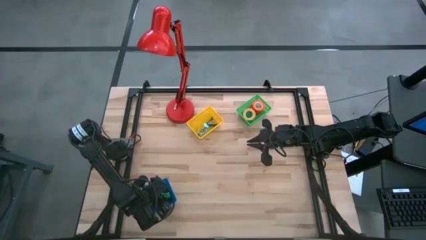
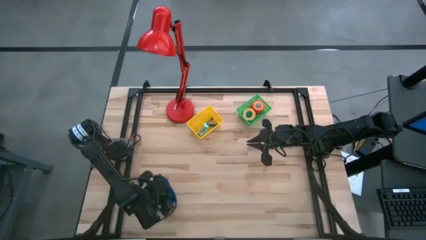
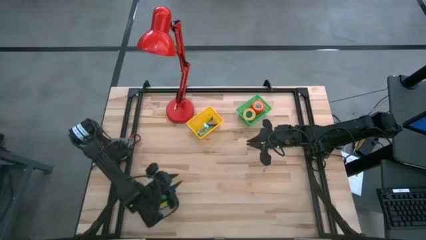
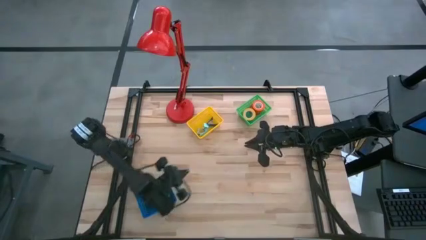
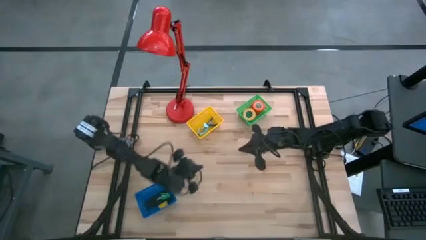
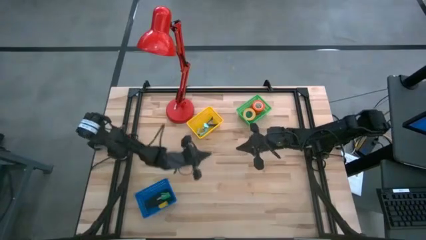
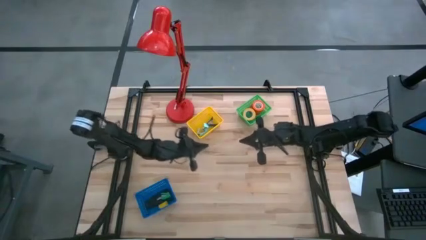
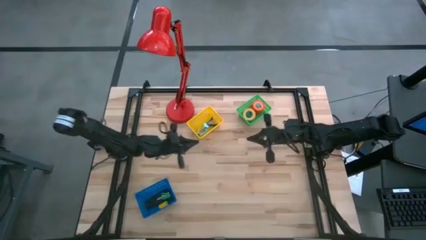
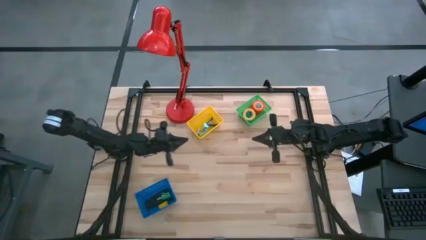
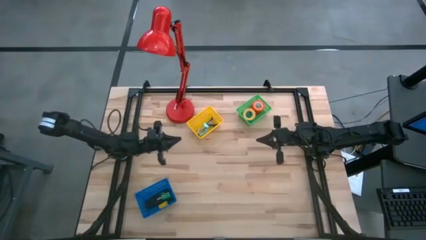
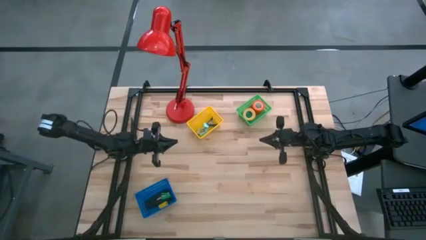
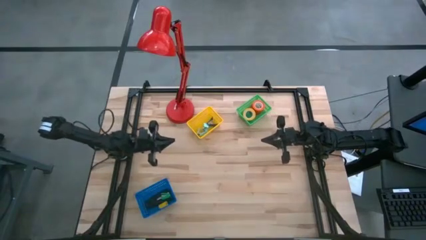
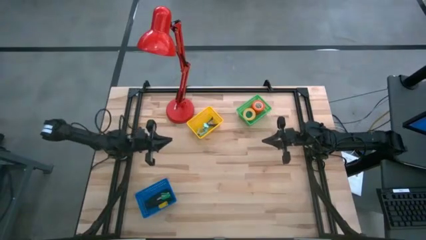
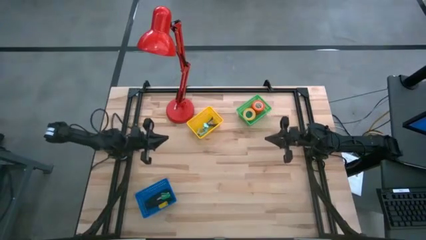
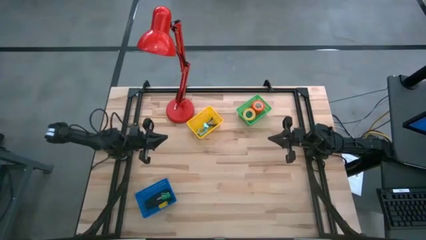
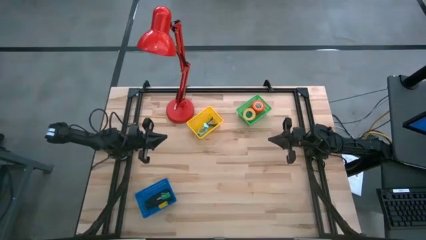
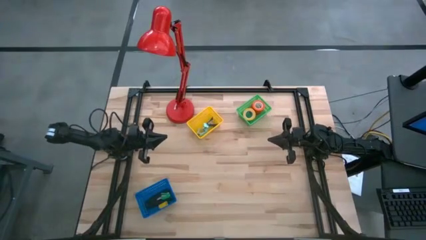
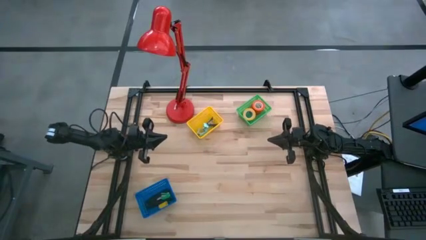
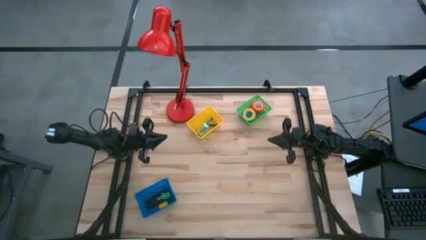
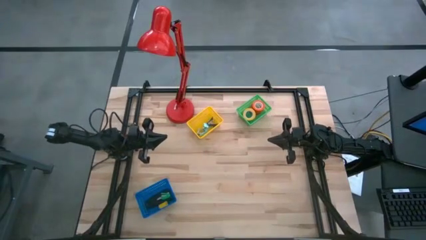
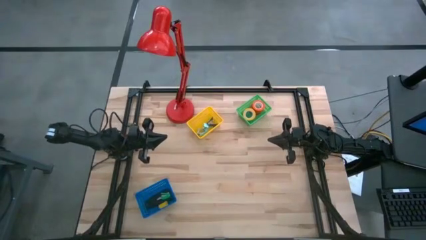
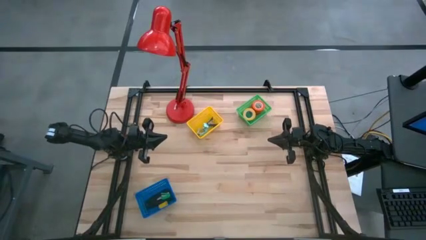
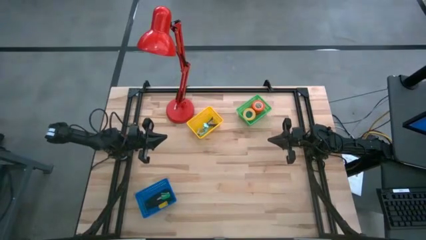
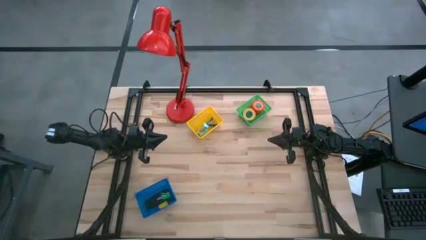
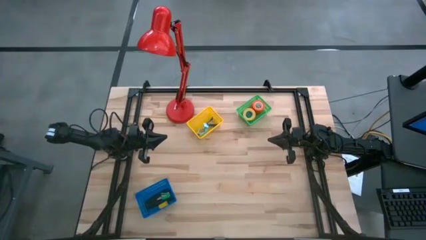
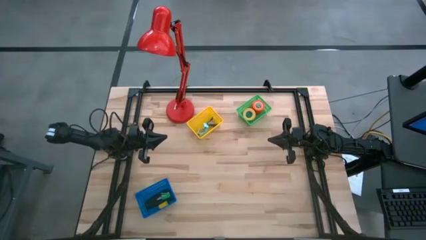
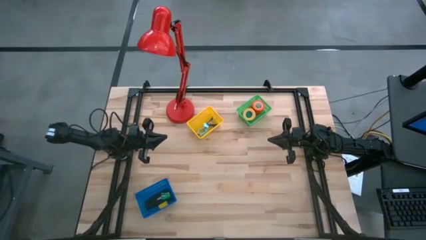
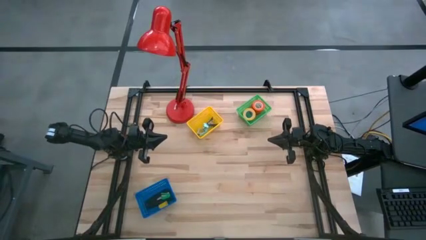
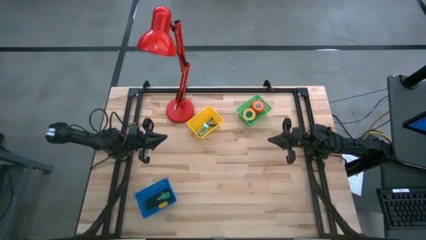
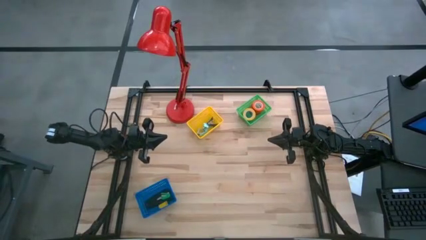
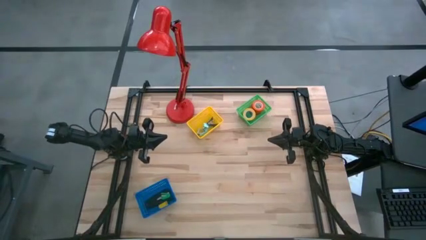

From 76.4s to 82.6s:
Task: Pick and place Stapler, Stapler remover, tape
Return to Home Position

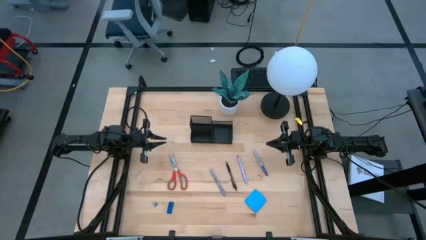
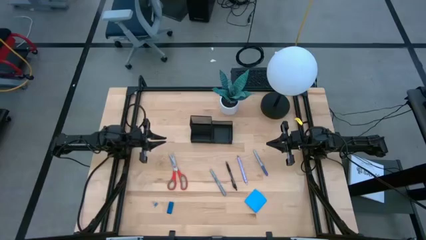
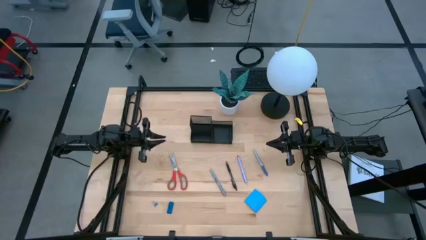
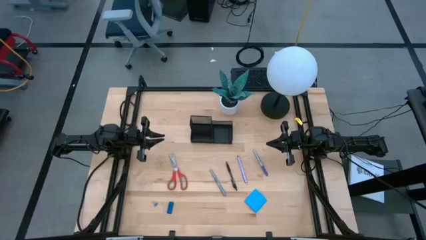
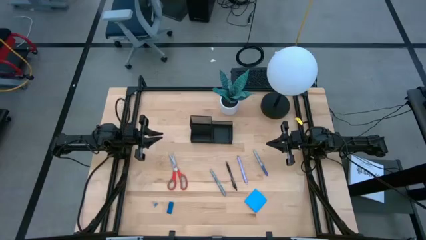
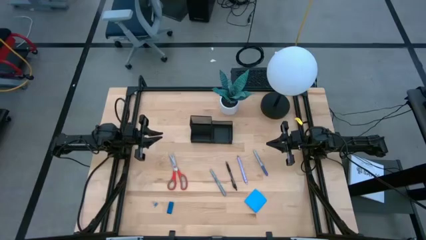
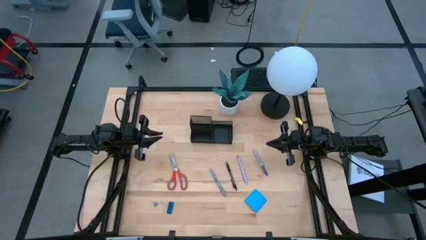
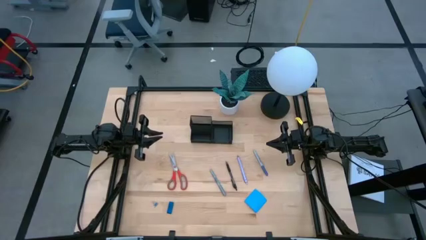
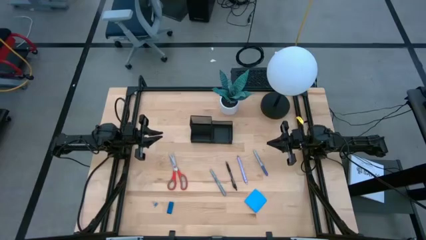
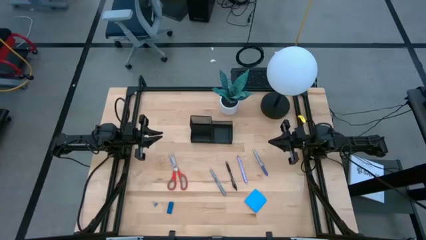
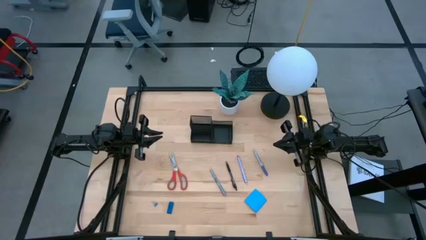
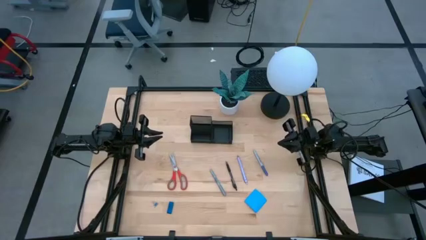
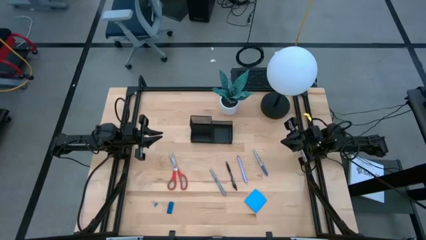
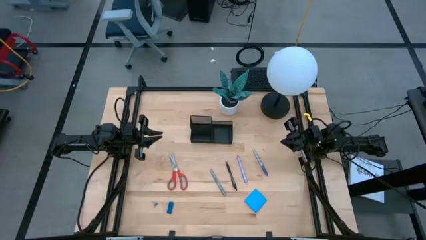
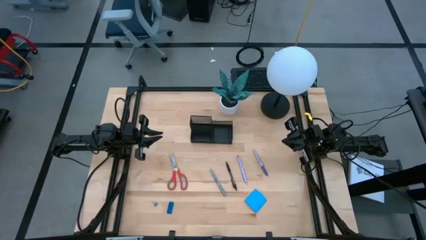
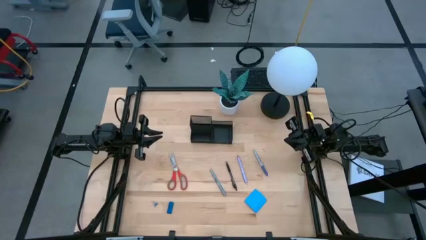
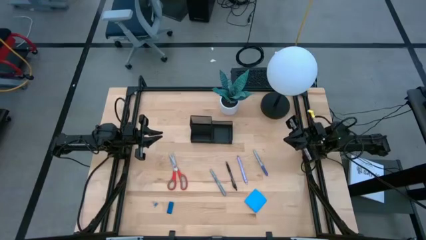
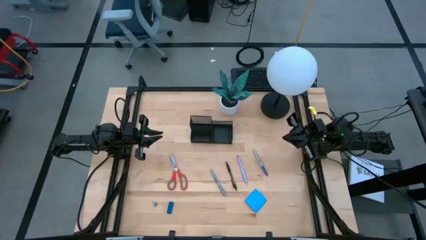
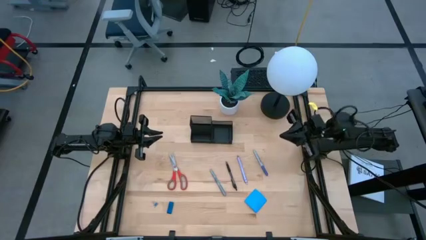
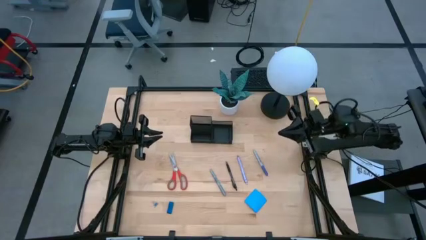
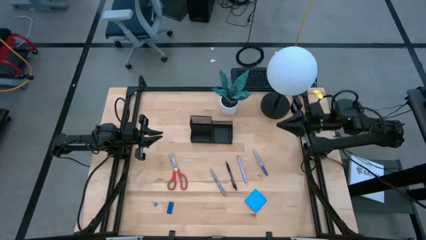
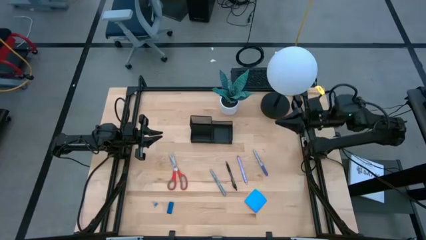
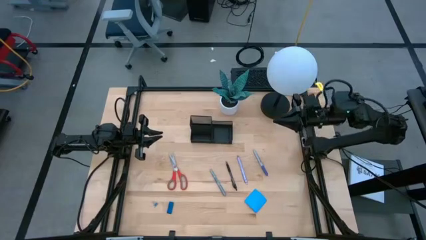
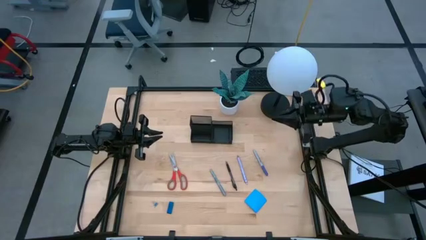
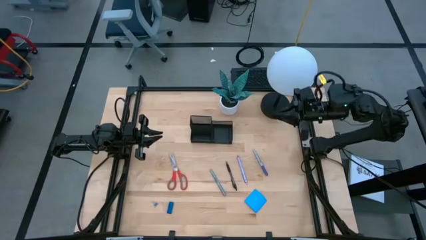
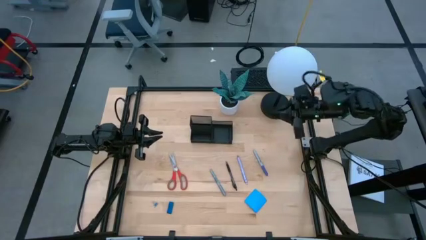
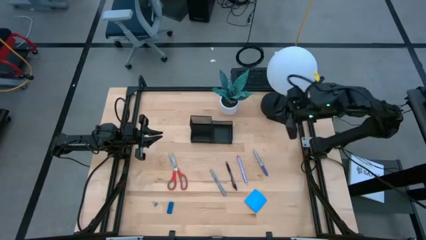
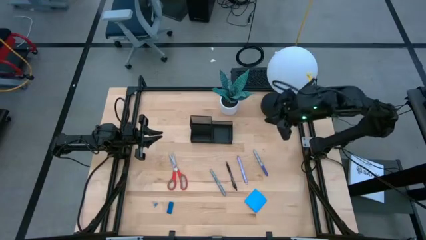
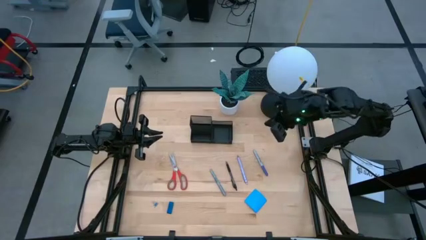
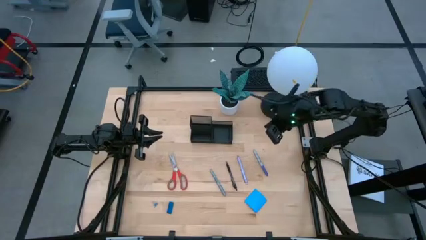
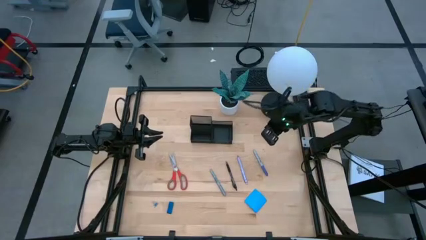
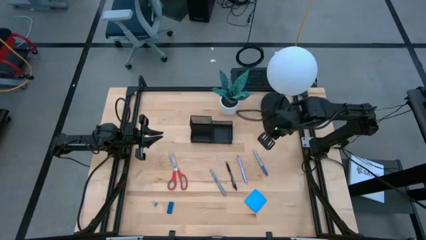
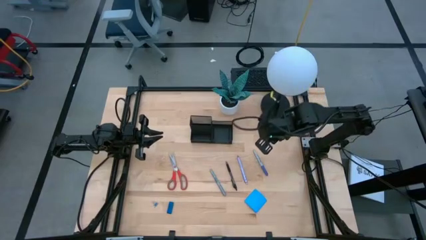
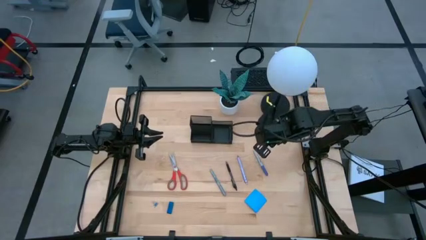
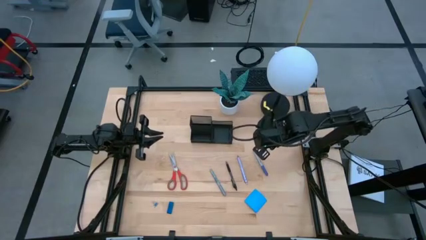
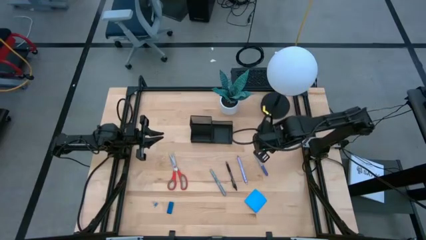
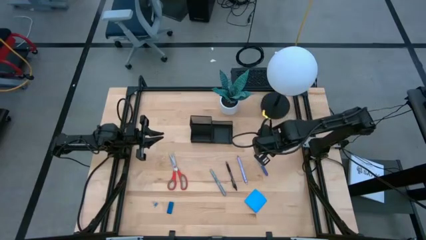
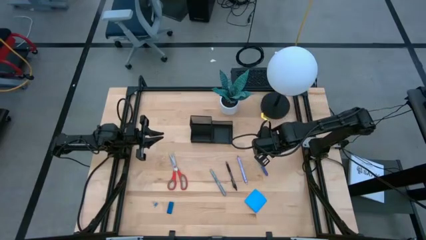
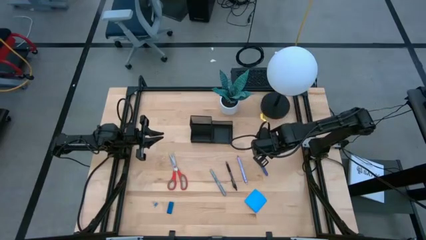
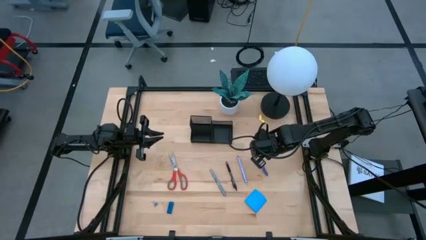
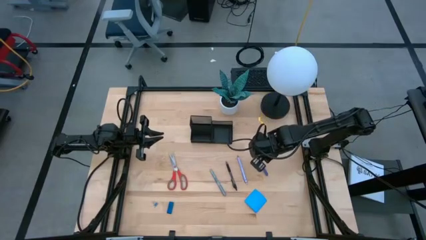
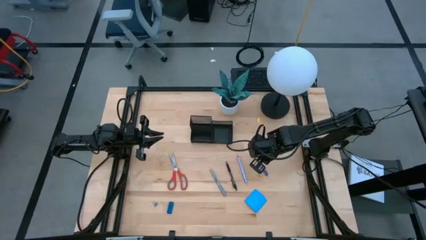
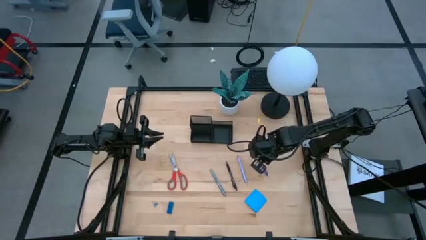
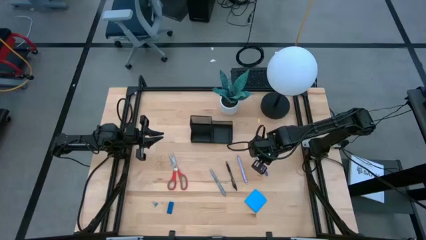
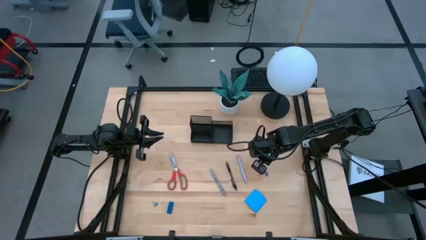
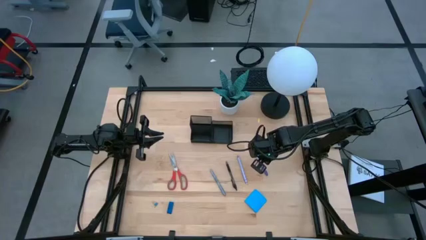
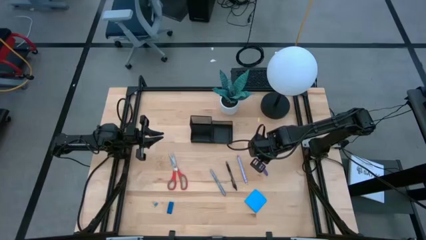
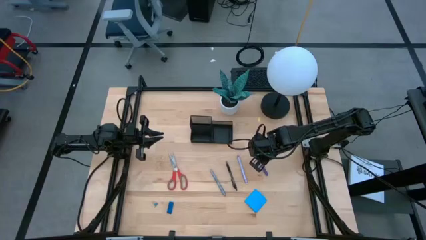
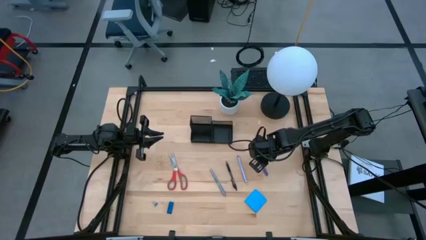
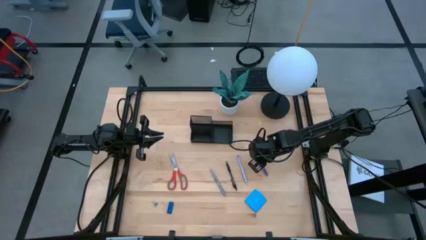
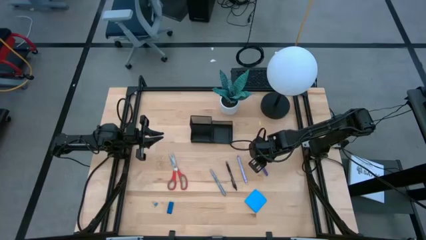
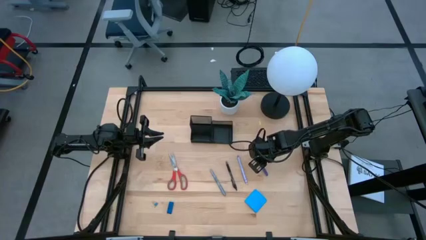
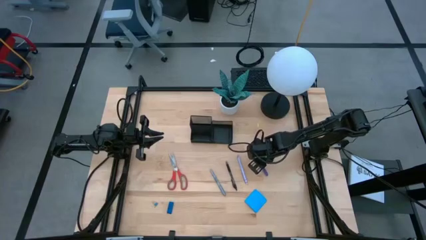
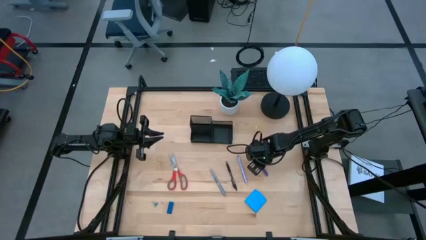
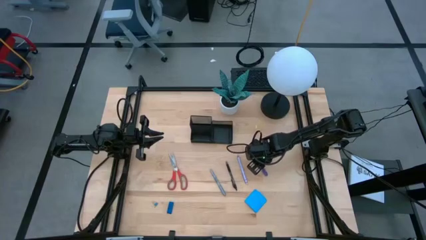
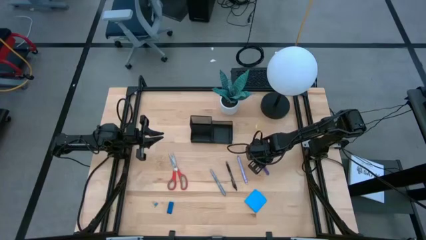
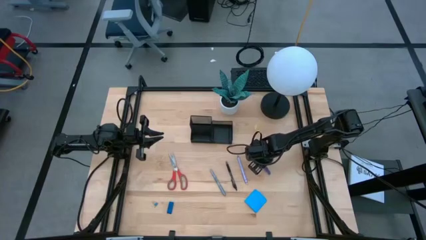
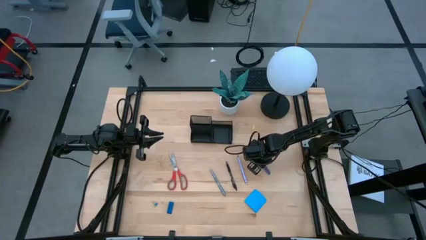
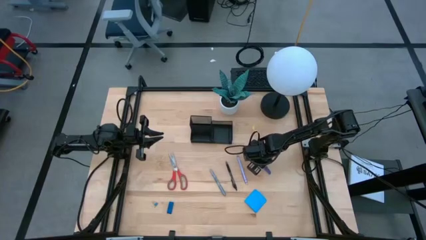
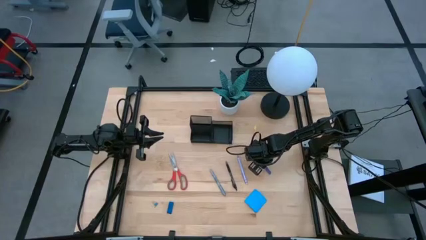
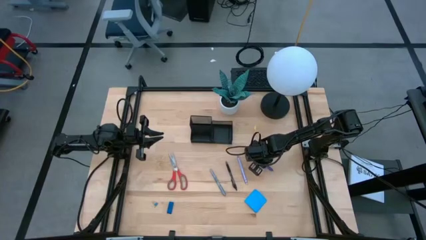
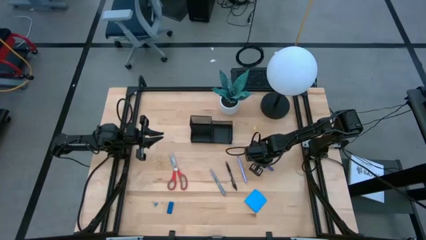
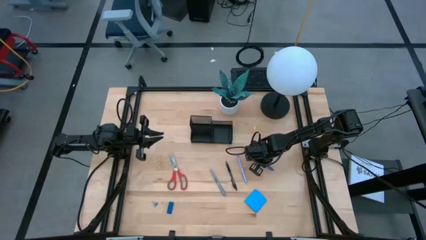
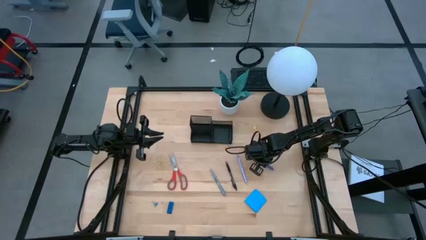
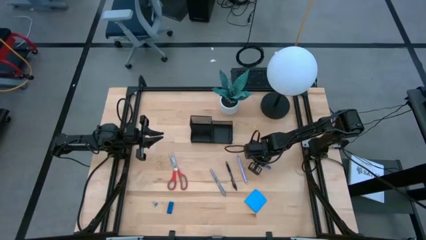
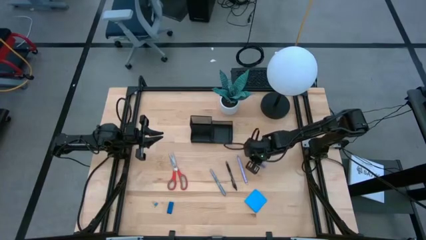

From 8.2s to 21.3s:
Task: Pick and place office supplies into organizer
Put the blue marker into the black desk organizer
